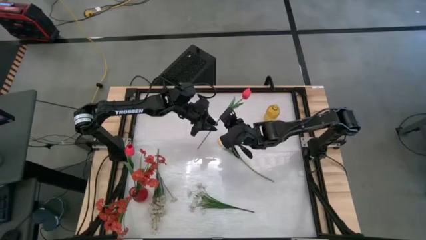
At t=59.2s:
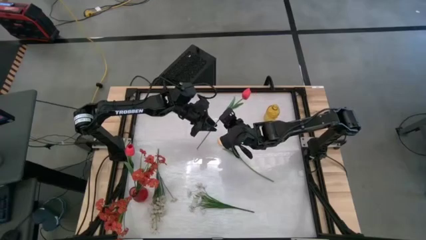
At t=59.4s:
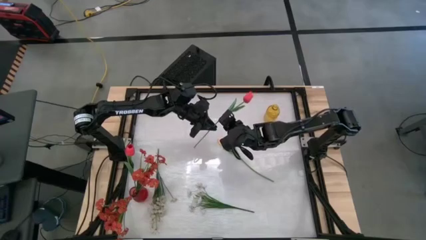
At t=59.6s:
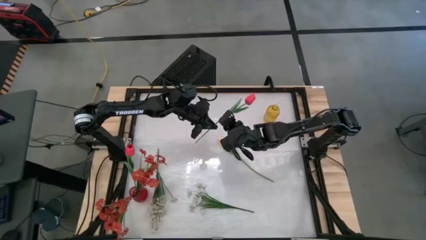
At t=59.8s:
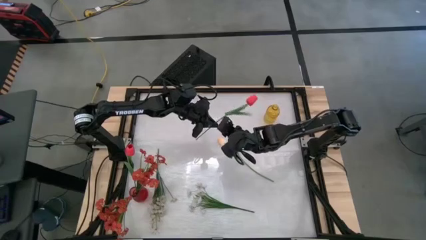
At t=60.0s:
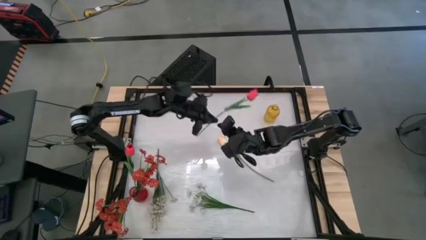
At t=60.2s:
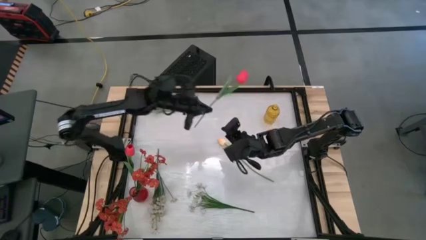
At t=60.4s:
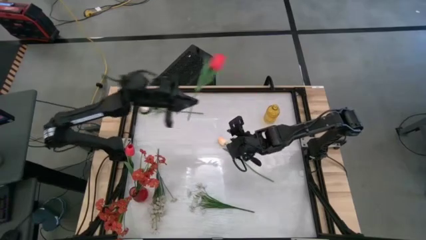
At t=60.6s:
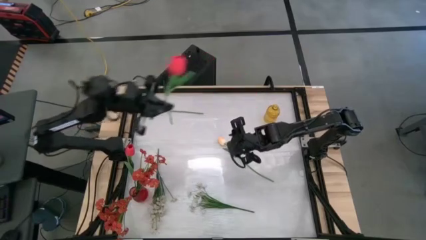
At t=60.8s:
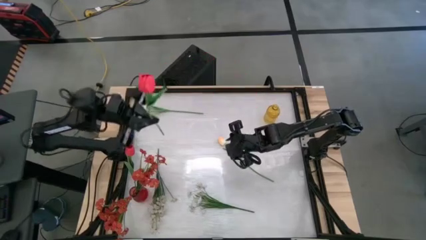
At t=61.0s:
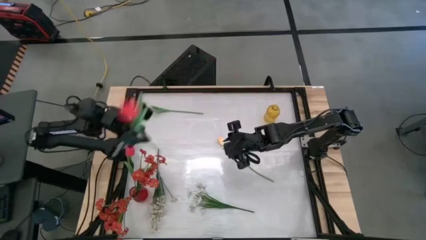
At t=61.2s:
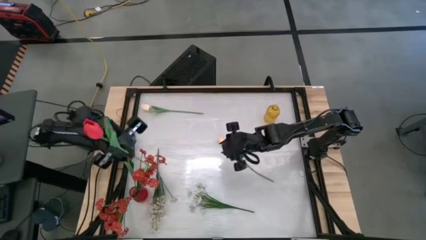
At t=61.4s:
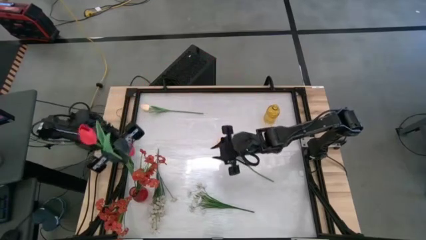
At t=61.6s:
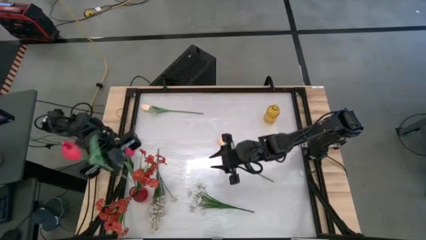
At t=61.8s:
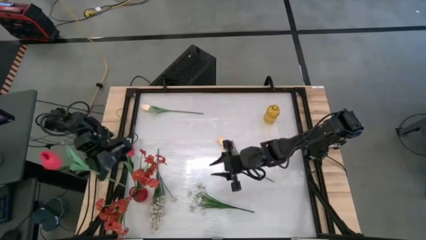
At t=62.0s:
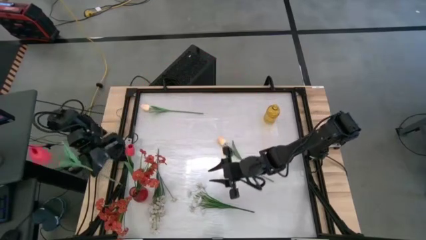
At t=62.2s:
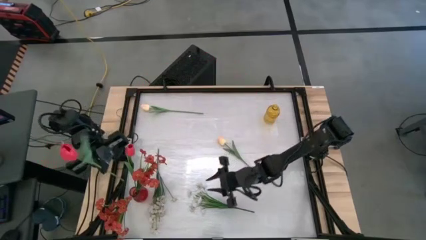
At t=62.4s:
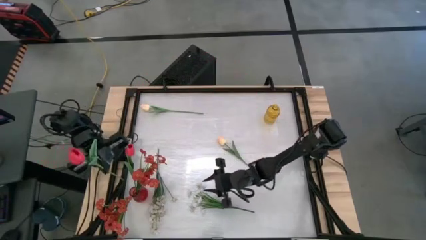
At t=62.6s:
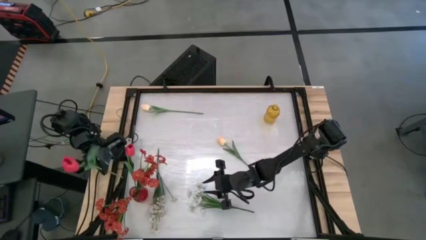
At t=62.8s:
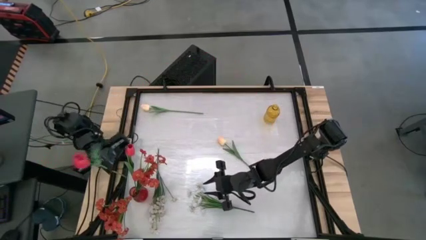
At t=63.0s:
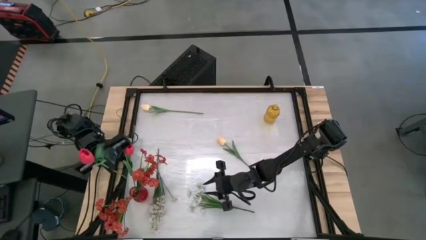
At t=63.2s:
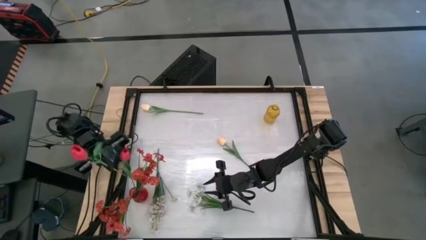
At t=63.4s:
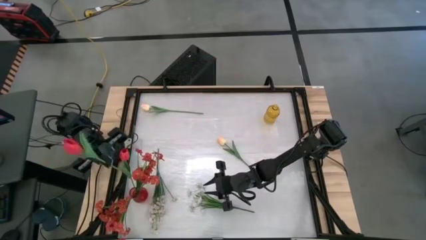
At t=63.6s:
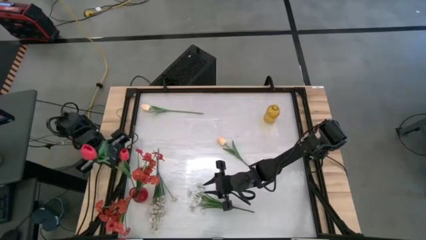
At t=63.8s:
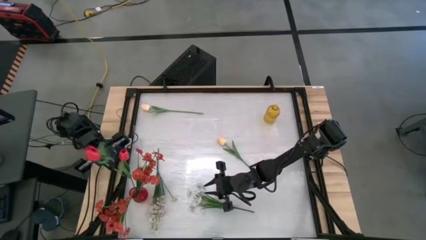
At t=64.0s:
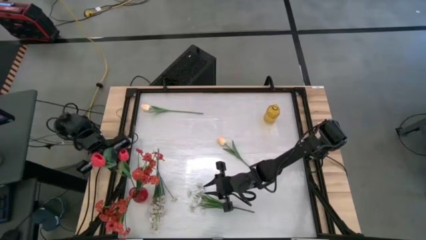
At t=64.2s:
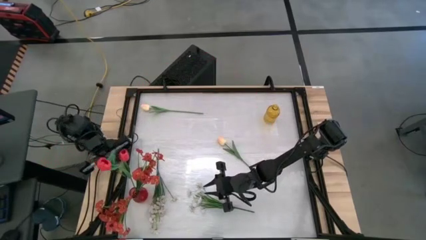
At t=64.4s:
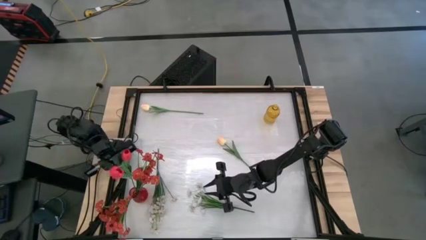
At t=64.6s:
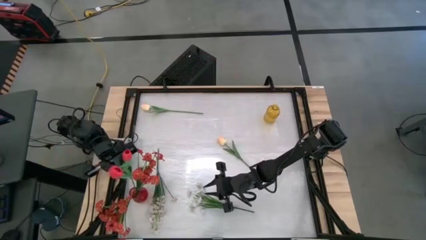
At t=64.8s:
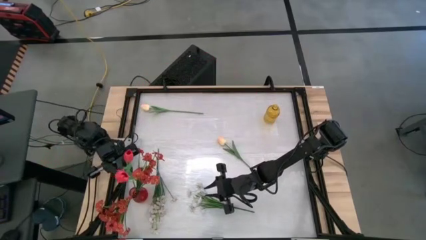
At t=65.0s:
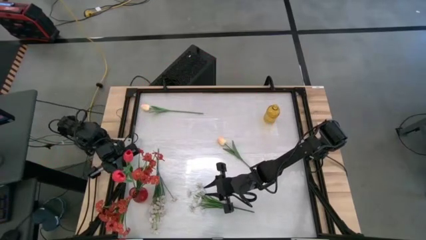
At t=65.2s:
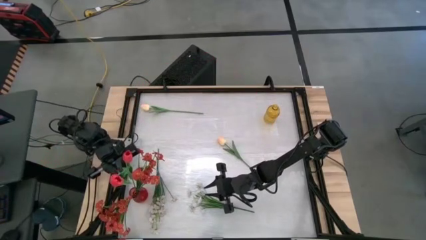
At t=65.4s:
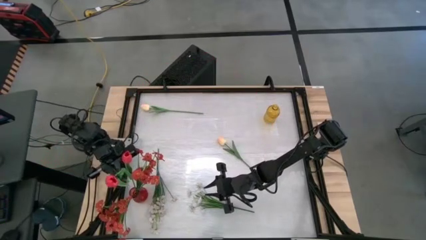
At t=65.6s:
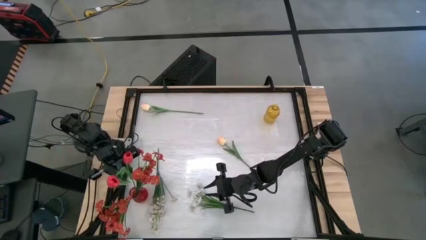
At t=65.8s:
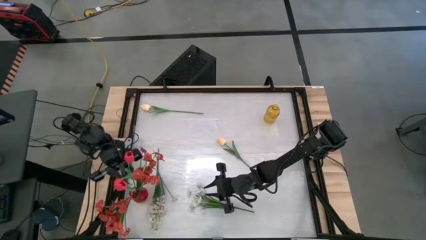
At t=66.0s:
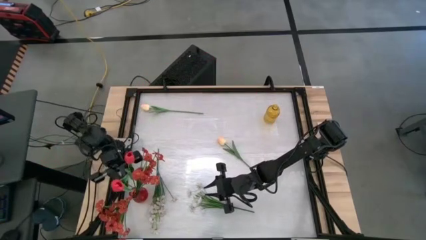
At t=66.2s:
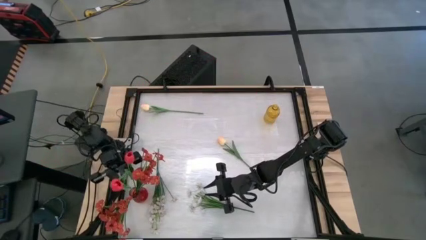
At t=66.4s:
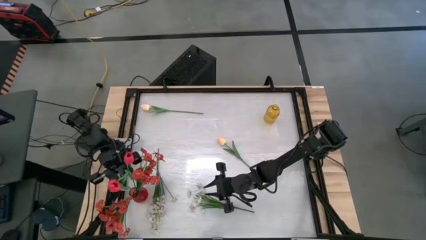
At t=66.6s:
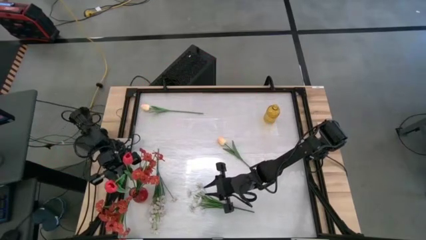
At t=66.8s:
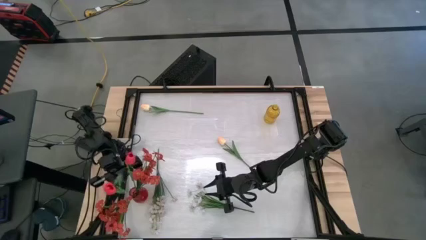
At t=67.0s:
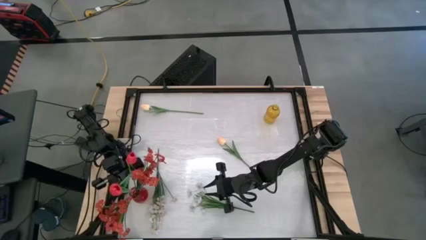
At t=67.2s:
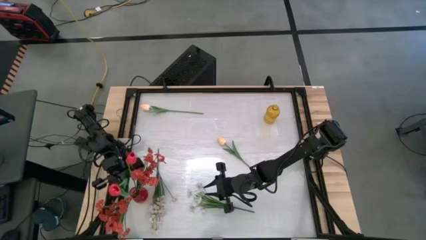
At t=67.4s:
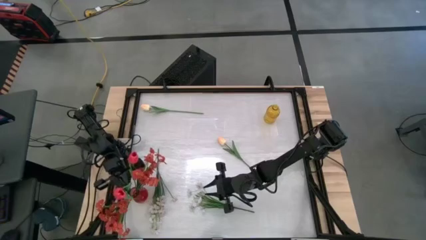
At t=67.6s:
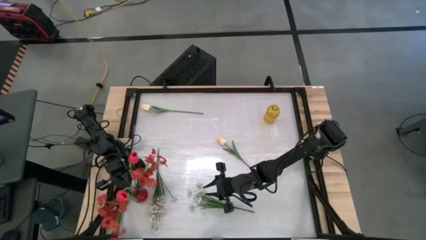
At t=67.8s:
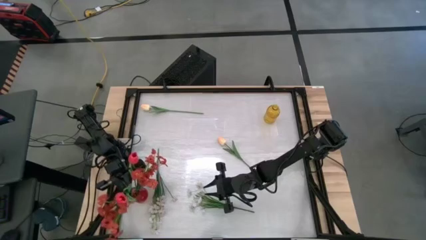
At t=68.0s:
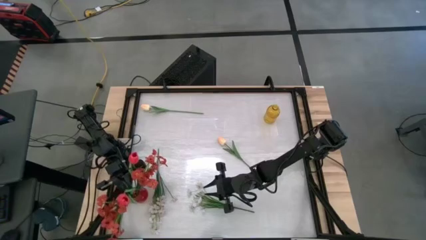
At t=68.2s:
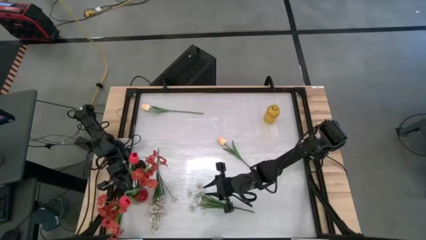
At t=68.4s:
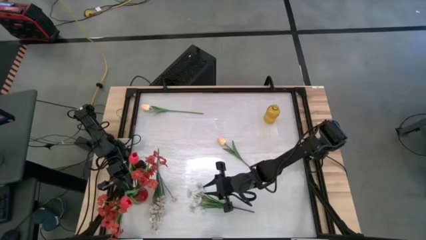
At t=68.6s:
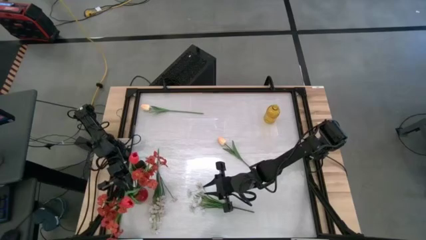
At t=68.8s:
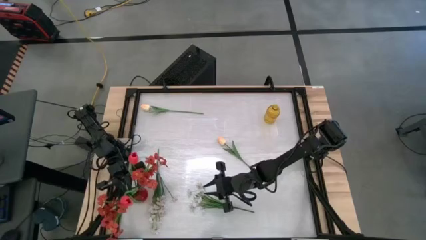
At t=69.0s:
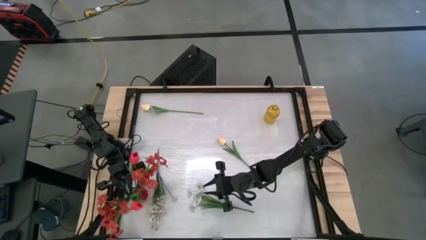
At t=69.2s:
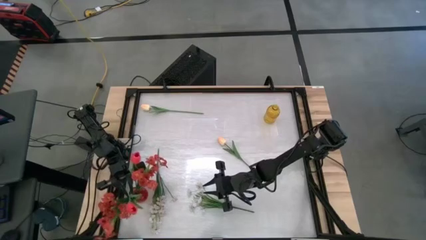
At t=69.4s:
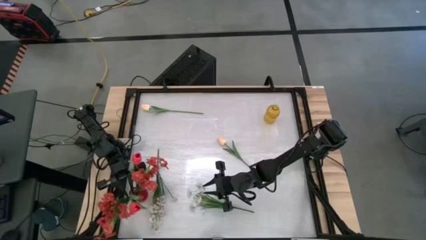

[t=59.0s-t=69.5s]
Task: Sort flowers into vase by color
Put the red tulip into the red vase
